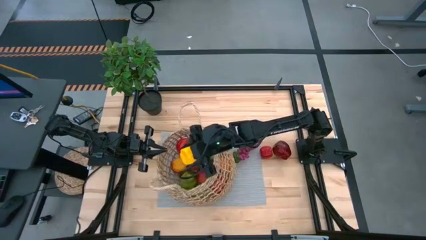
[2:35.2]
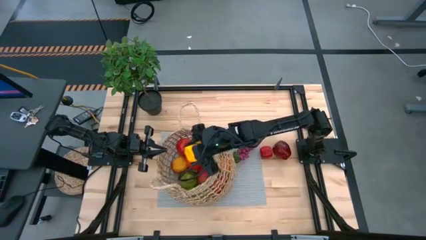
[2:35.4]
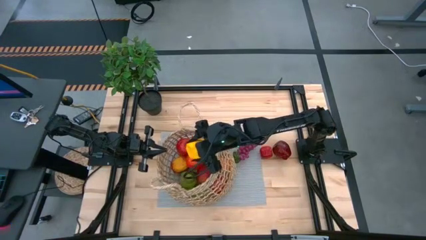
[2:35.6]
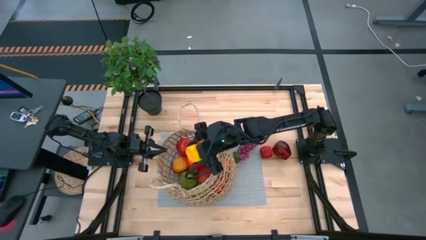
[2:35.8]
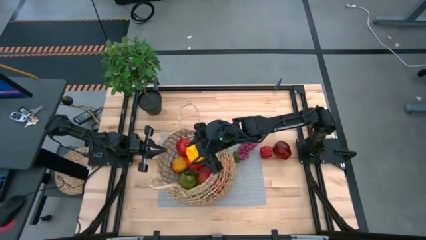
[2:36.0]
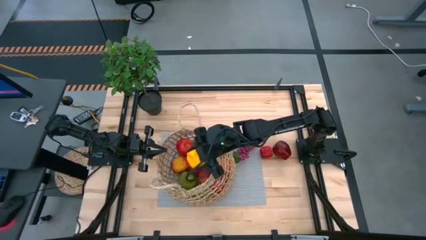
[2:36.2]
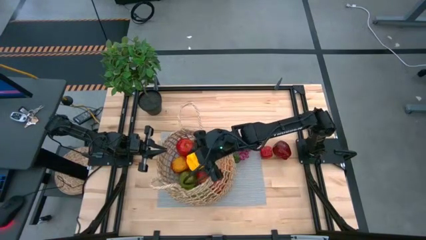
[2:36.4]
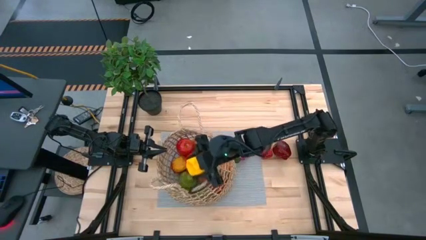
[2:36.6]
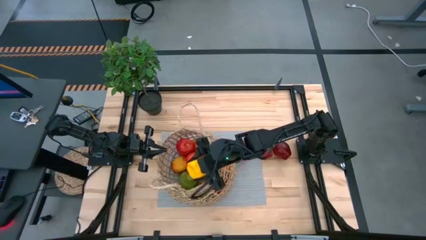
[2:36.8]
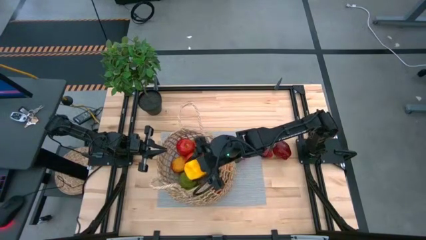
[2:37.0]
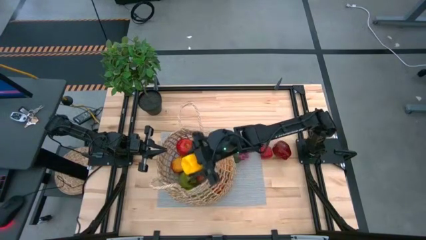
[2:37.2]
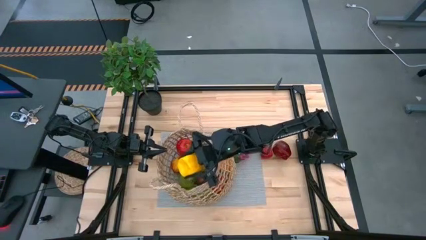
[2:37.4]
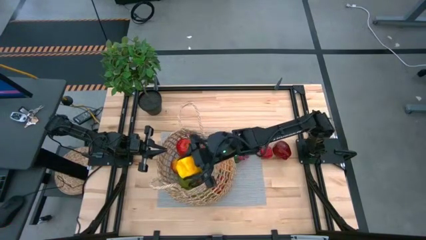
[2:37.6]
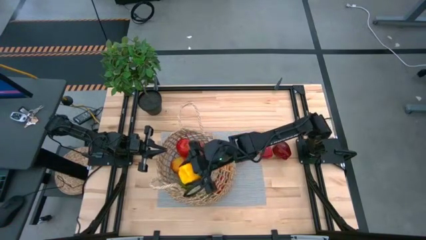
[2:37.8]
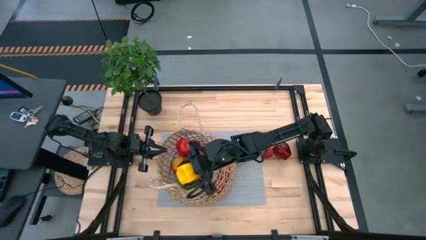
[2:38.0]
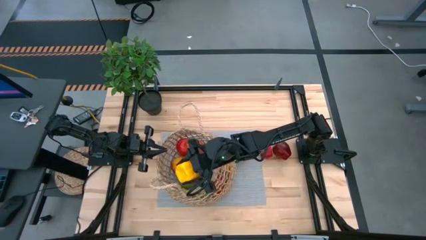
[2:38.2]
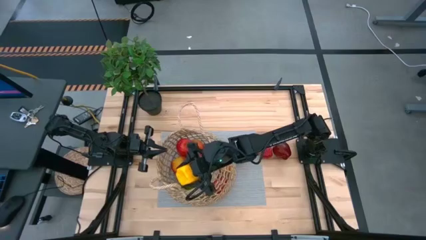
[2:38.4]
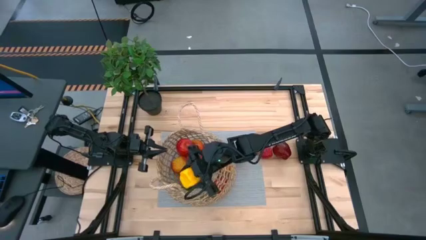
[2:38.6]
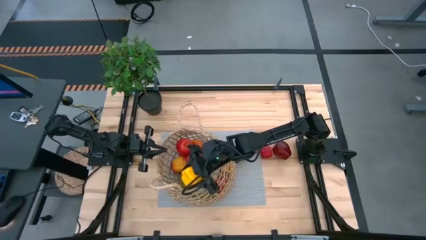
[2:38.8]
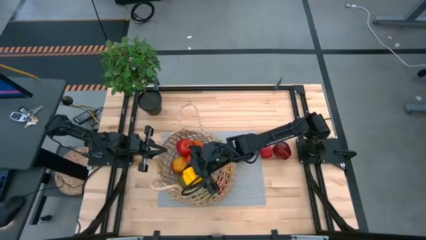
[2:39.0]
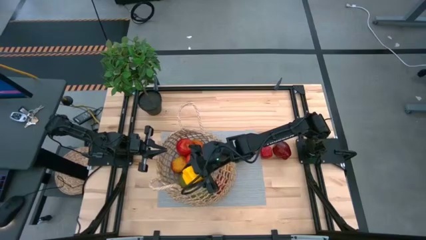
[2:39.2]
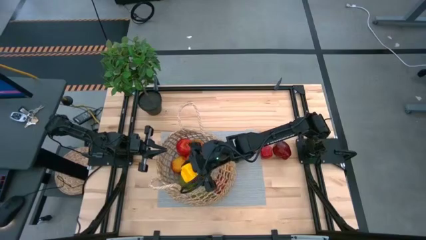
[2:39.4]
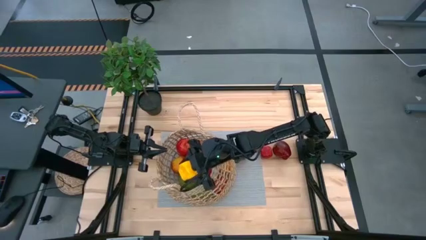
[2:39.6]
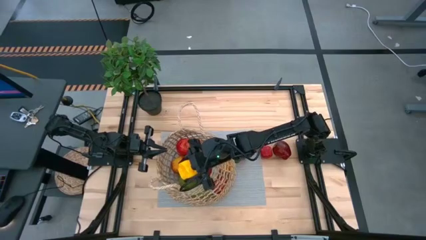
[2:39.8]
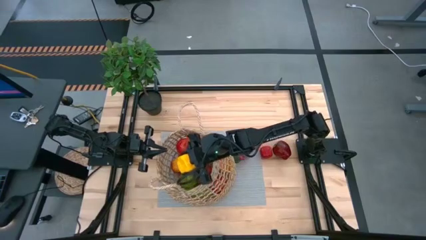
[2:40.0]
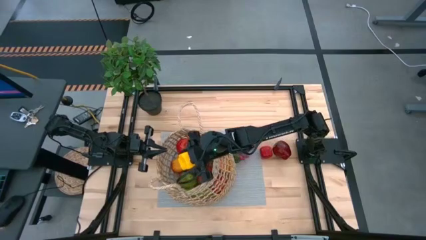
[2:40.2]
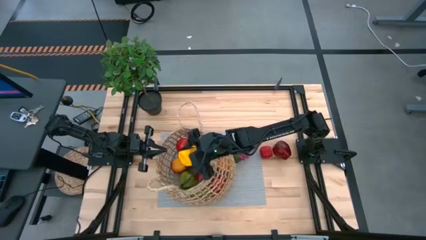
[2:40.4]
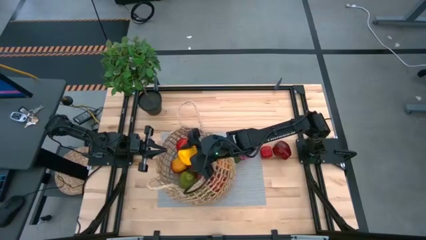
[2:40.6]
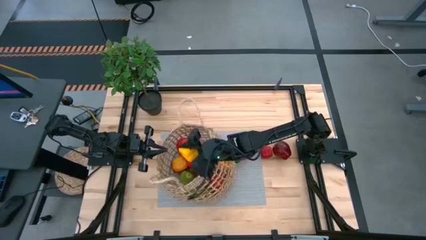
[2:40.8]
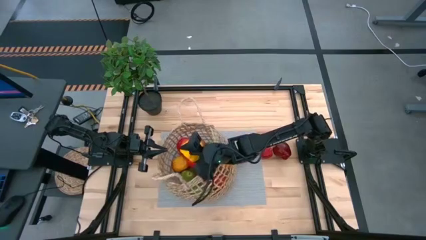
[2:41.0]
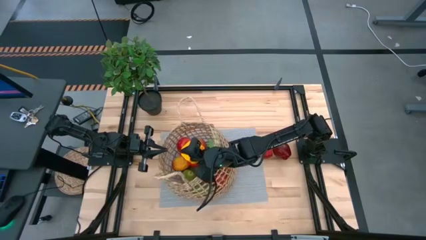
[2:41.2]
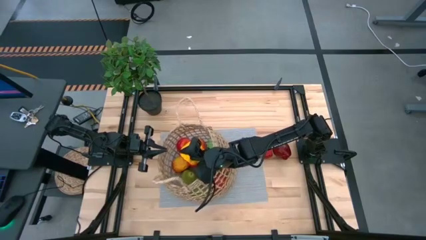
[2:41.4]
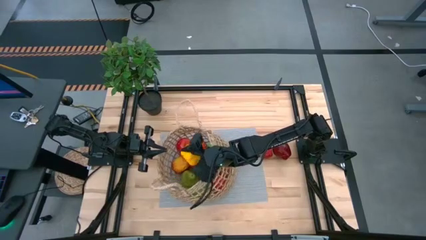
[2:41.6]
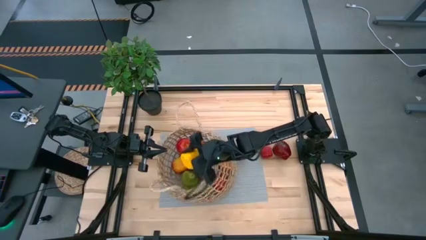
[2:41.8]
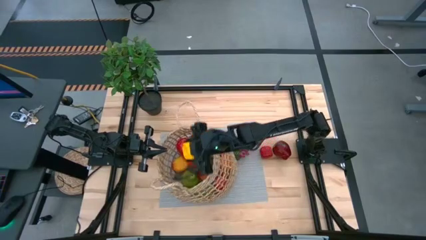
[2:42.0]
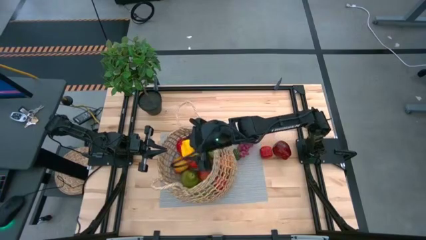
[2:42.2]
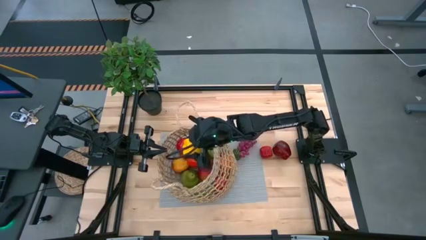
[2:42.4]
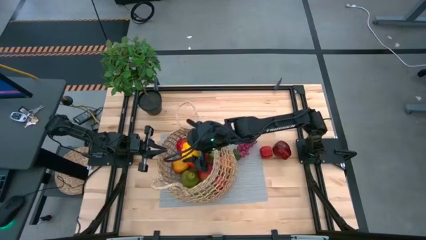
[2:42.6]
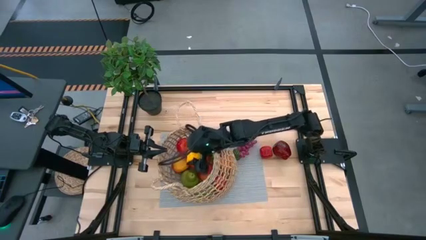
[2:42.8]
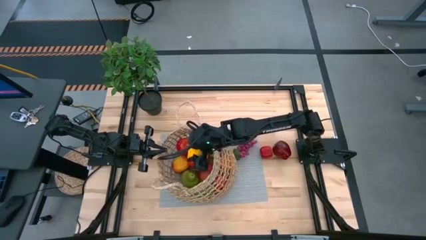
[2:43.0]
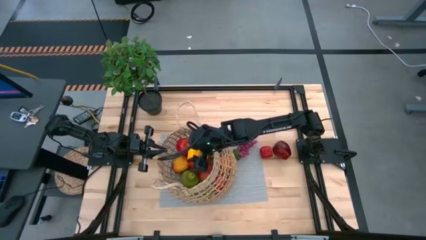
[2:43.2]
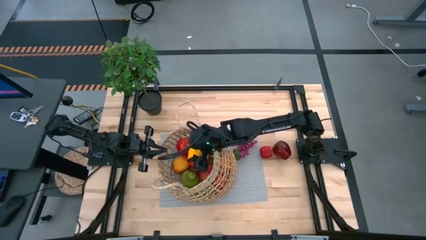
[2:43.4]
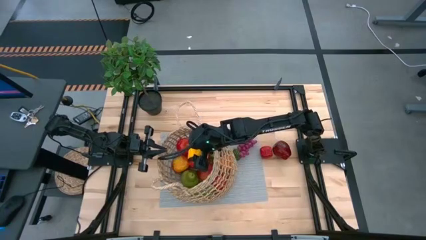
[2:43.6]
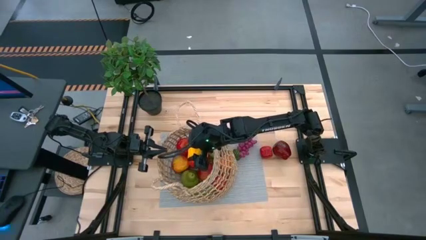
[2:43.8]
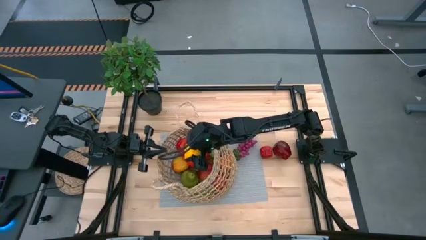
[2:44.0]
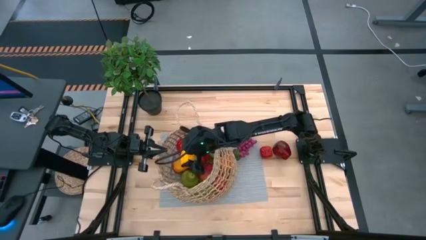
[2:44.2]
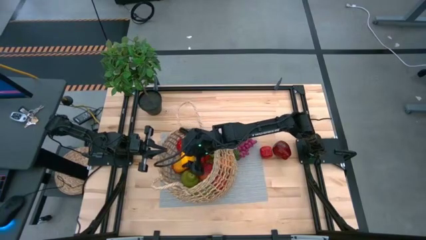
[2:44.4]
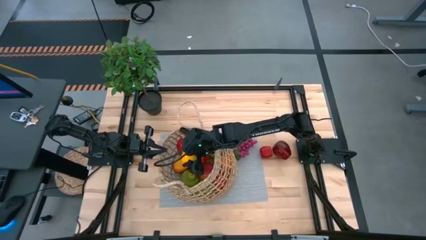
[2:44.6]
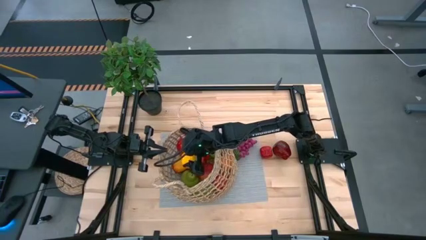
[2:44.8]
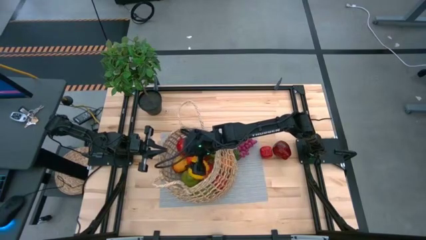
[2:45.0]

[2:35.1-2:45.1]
Task: Build produce basket
Put the bell pepper into the brown basket

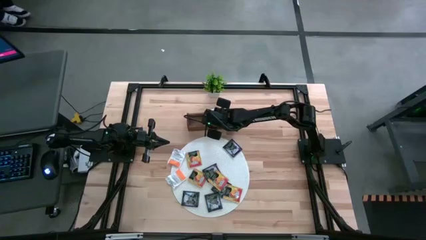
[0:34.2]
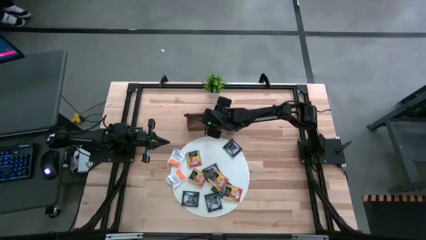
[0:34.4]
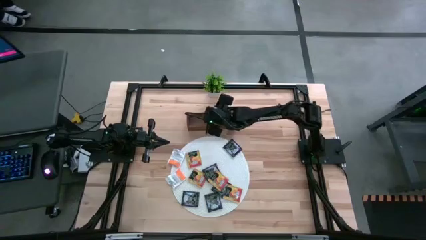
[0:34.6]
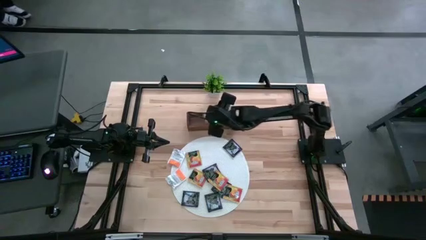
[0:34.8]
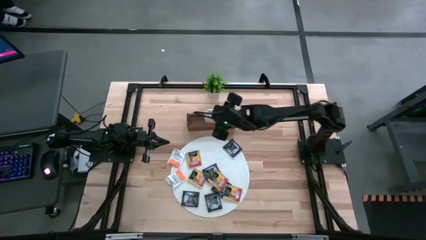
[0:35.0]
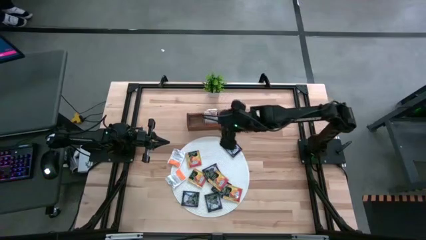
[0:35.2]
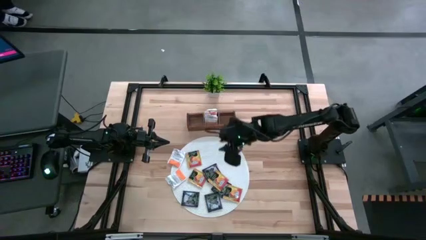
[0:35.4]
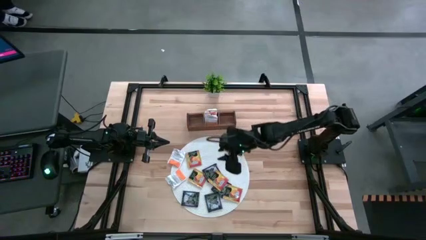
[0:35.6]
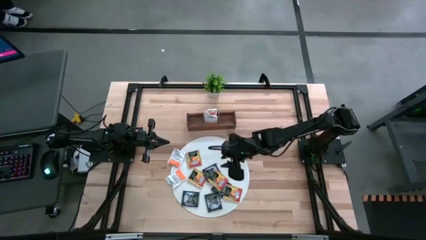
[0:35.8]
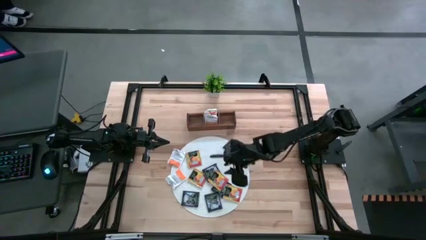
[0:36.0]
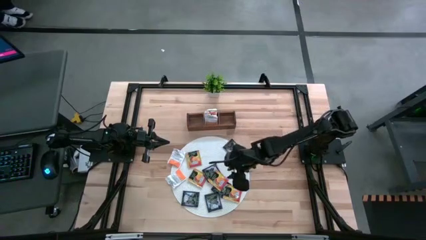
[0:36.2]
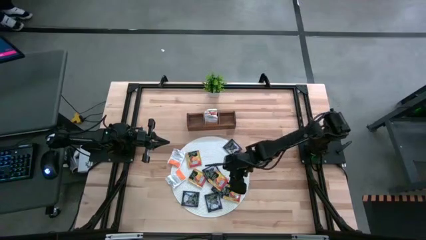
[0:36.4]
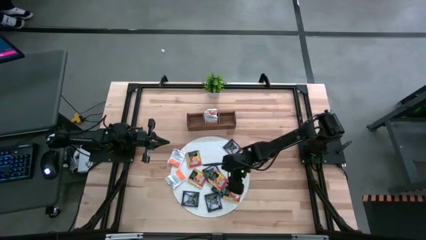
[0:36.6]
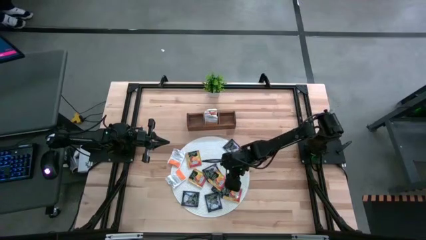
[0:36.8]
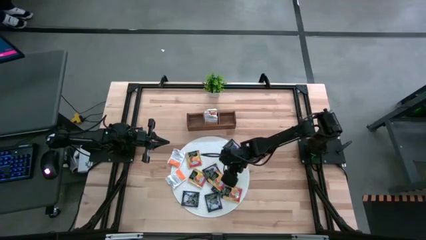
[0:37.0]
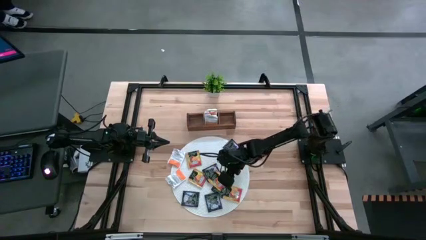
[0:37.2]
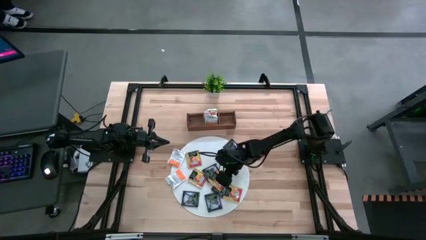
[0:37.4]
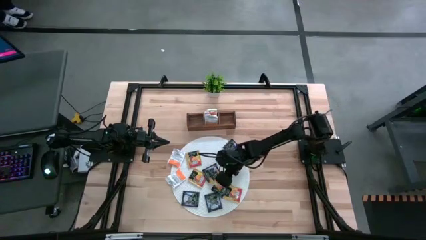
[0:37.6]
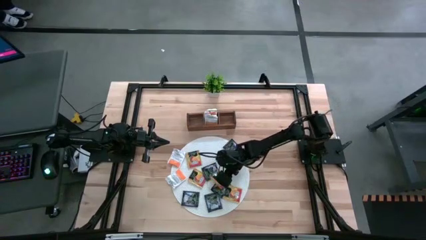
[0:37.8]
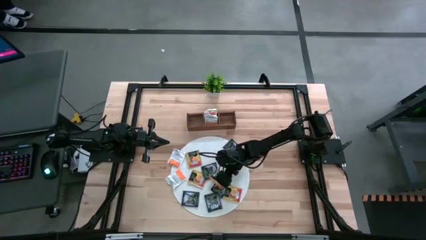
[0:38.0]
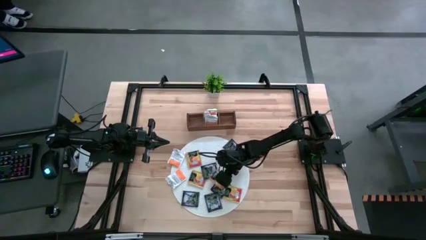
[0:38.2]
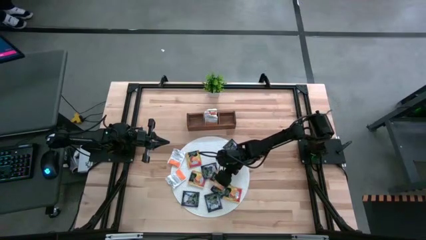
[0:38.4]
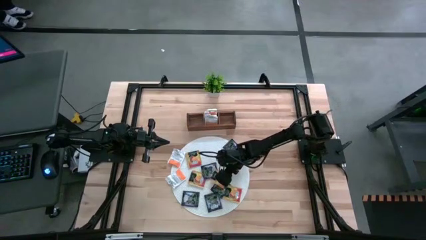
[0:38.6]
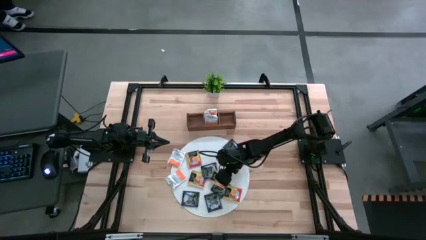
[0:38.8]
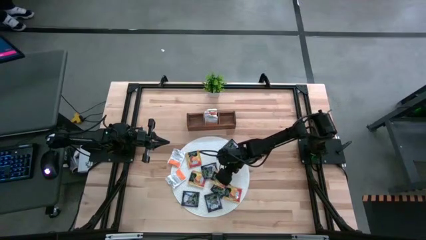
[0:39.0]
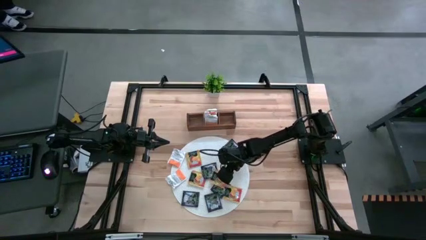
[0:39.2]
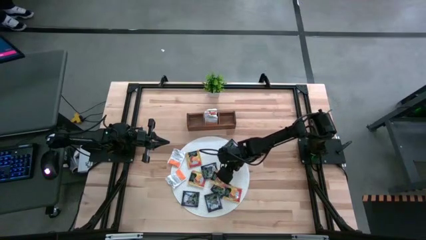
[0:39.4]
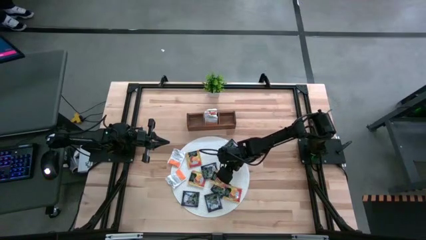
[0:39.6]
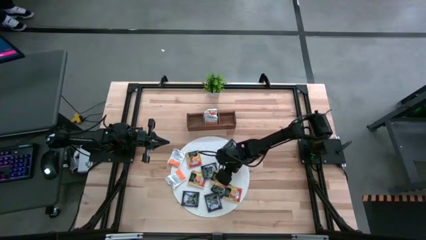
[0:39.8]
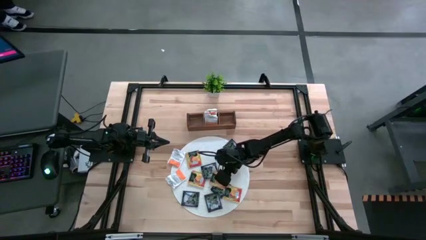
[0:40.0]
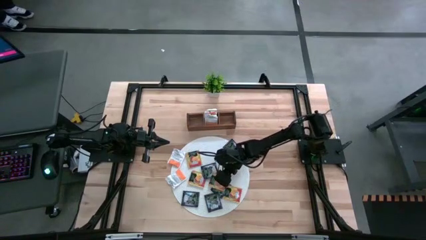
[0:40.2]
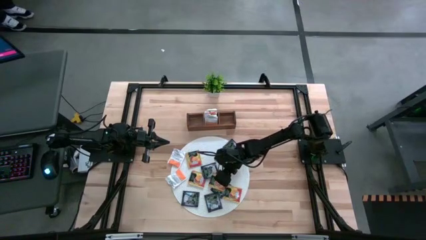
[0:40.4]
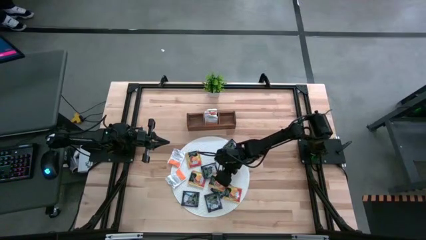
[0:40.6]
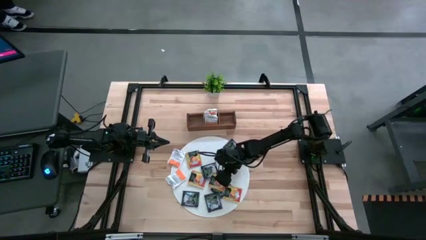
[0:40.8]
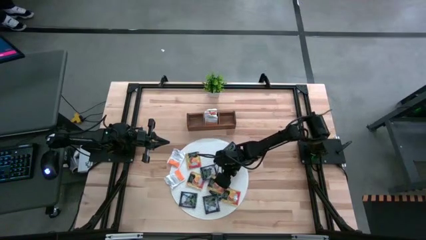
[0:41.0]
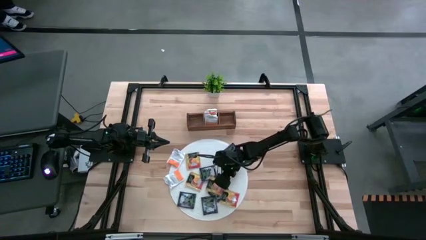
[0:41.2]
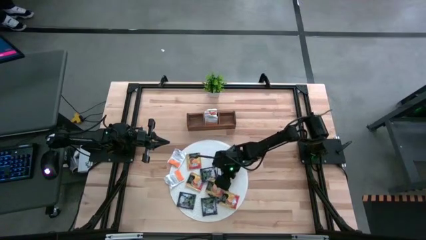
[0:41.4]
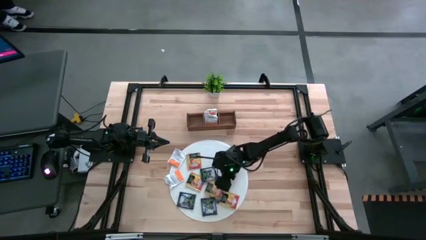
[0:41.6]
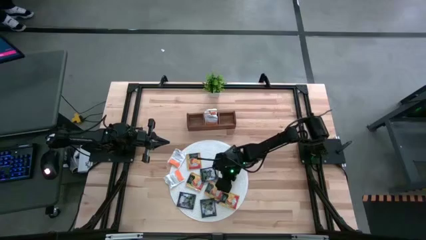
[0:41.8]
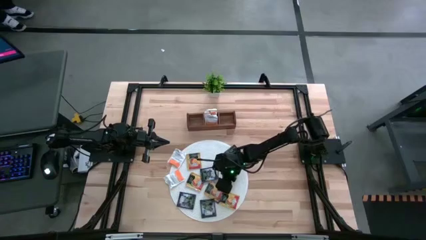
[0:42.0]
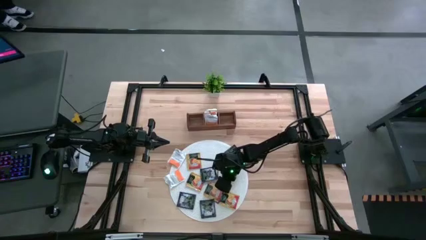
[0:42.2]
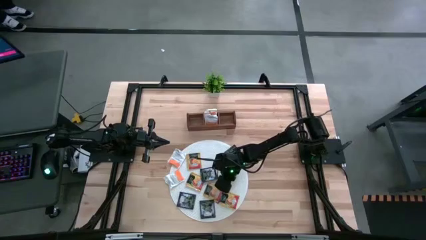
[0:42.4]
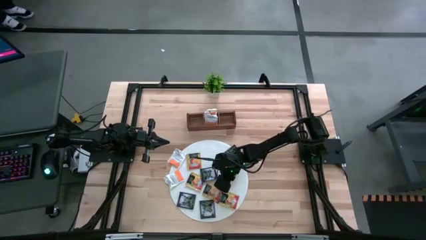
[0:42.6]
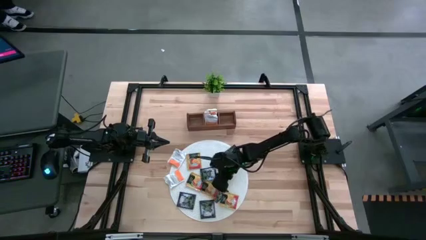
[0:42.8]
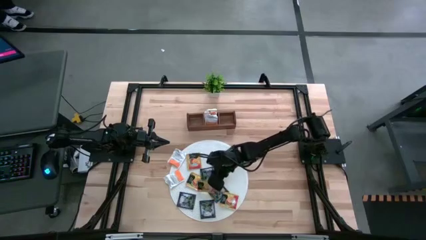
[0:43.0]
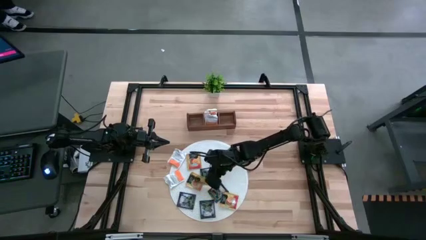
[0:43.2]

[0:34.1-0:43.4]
Task: Pick & Place Tea
Put the yellow tea bag into the right section of the wooden organizer
